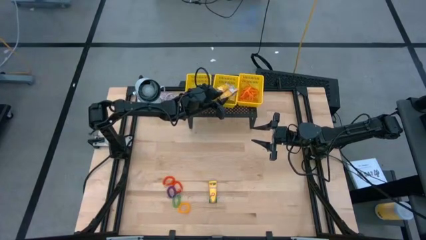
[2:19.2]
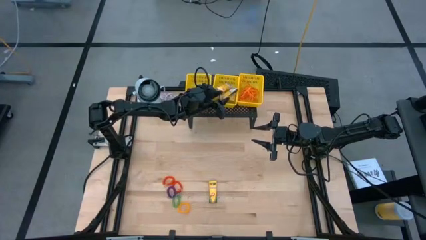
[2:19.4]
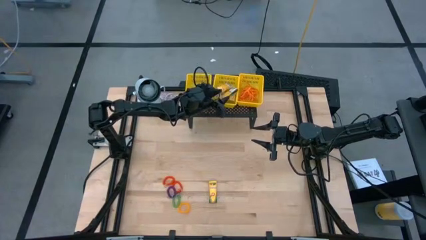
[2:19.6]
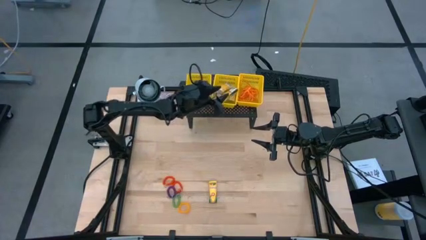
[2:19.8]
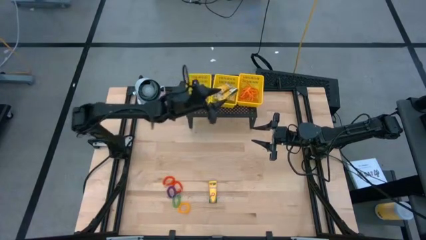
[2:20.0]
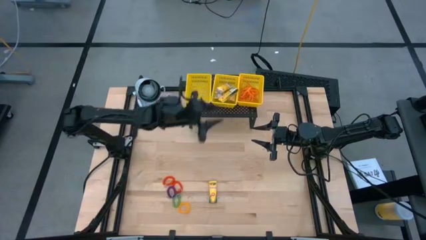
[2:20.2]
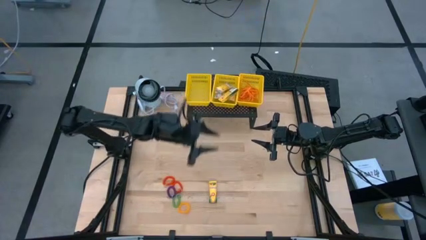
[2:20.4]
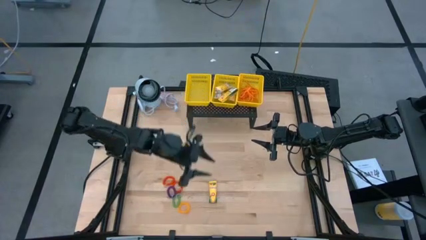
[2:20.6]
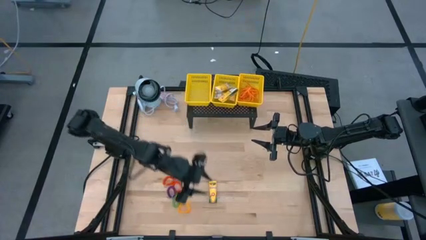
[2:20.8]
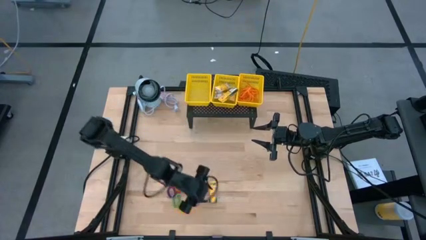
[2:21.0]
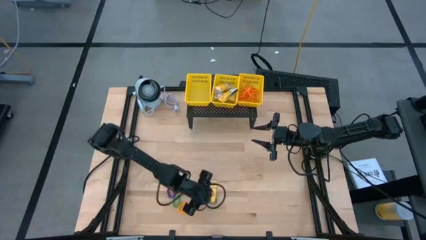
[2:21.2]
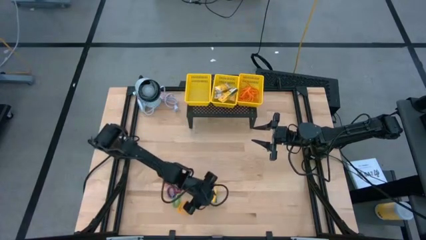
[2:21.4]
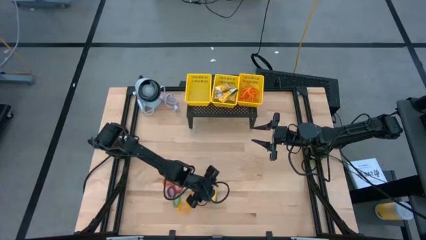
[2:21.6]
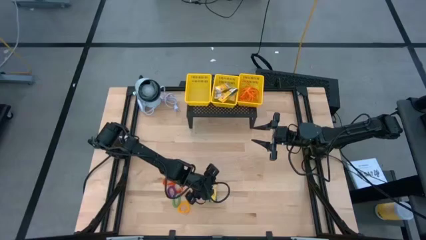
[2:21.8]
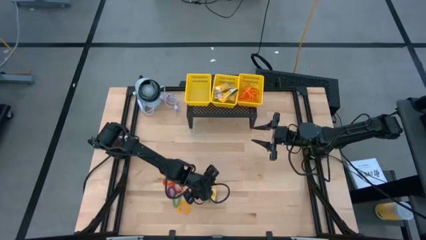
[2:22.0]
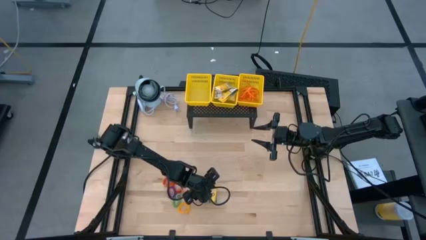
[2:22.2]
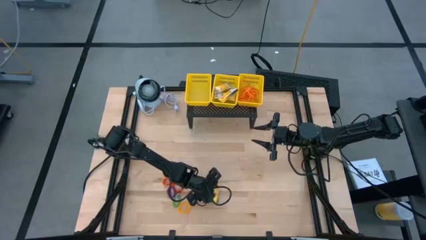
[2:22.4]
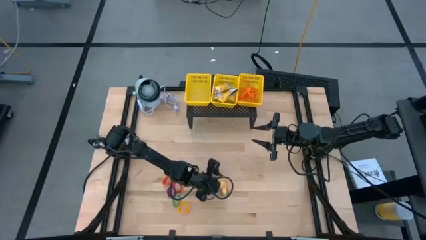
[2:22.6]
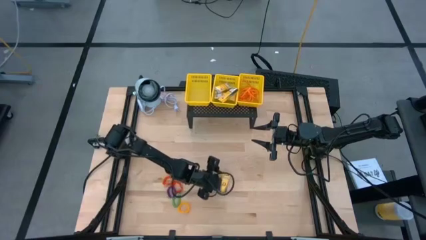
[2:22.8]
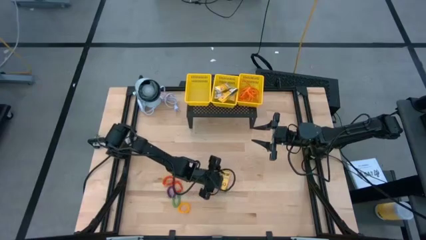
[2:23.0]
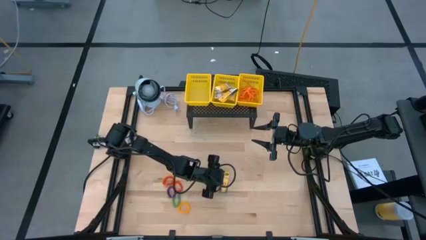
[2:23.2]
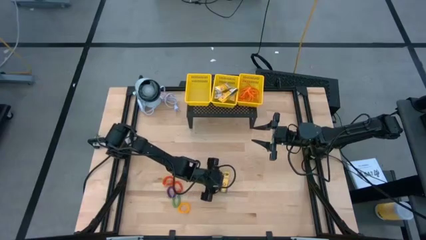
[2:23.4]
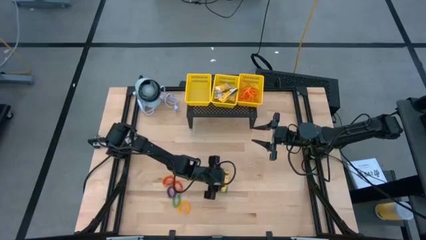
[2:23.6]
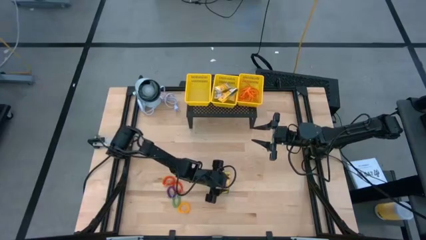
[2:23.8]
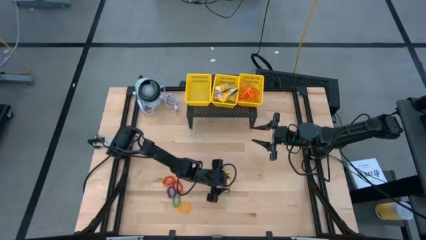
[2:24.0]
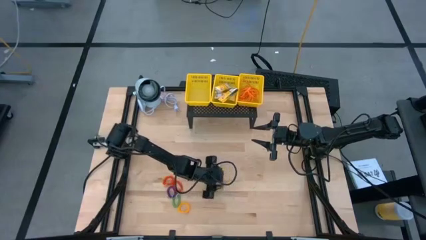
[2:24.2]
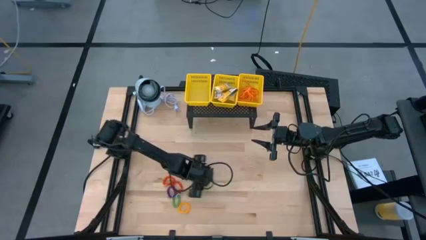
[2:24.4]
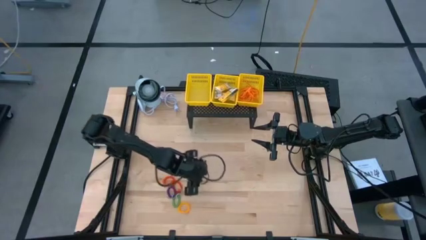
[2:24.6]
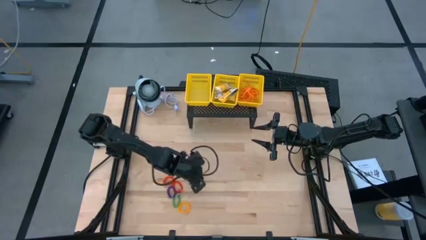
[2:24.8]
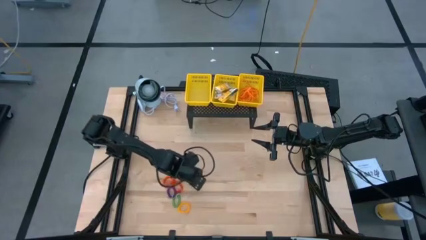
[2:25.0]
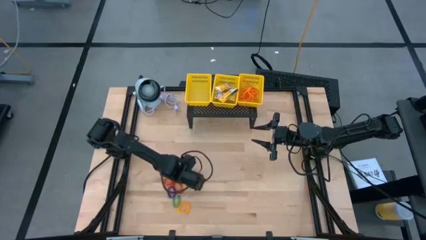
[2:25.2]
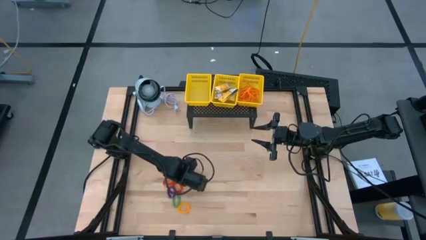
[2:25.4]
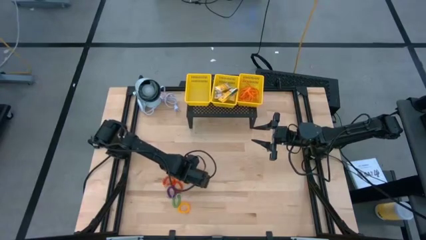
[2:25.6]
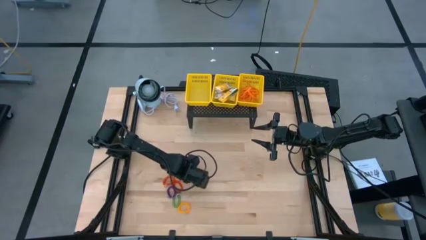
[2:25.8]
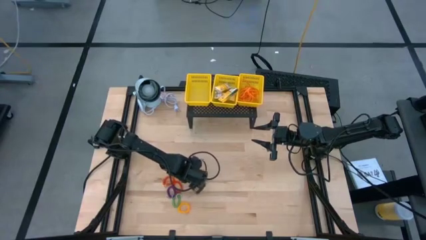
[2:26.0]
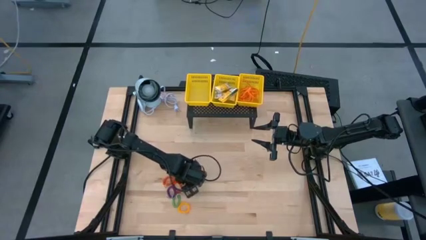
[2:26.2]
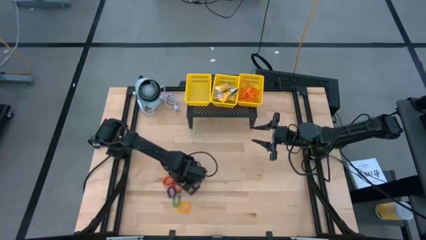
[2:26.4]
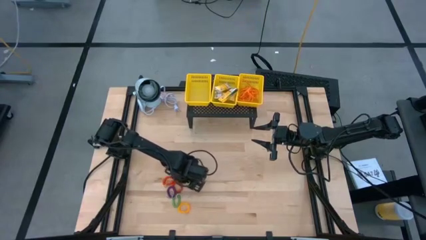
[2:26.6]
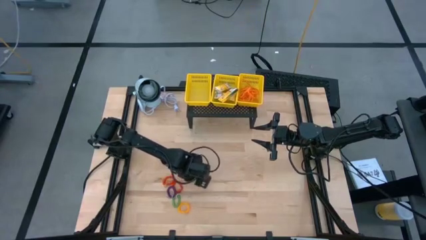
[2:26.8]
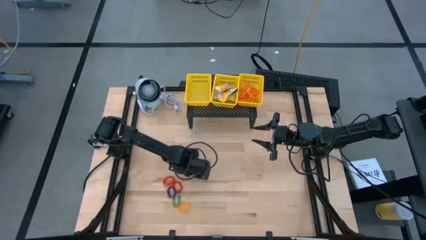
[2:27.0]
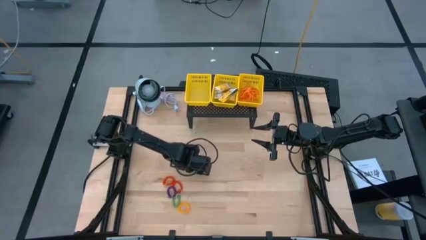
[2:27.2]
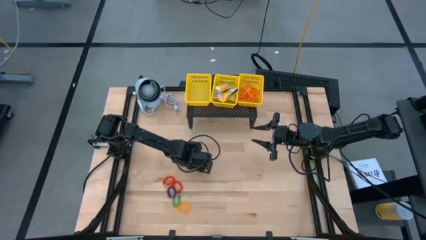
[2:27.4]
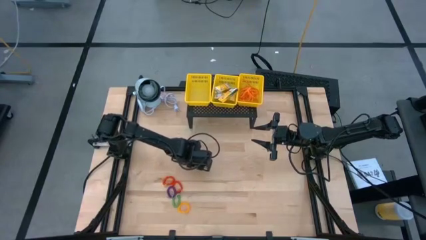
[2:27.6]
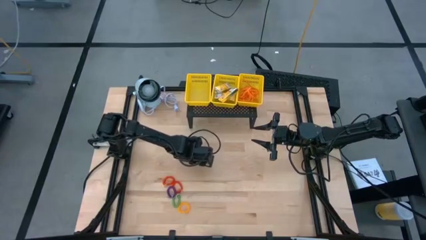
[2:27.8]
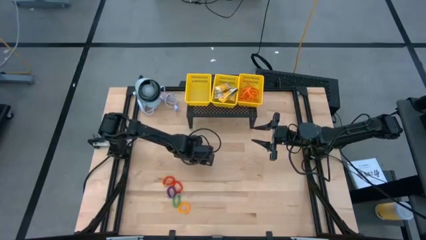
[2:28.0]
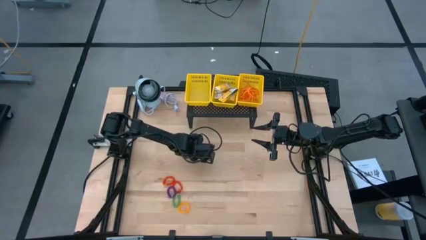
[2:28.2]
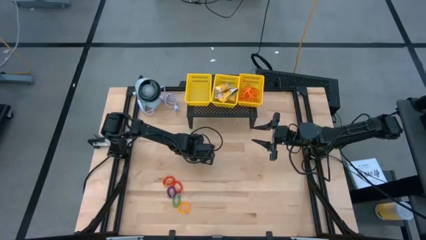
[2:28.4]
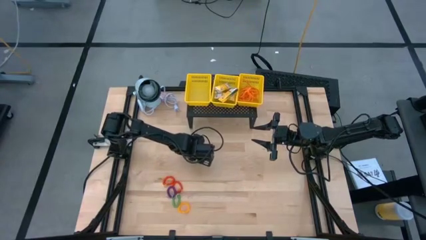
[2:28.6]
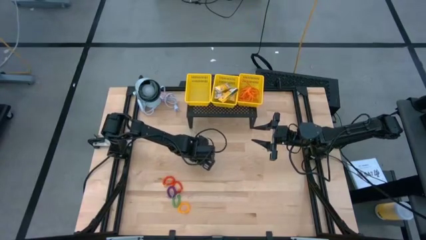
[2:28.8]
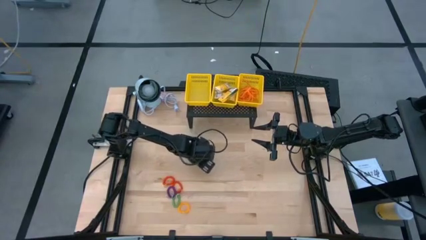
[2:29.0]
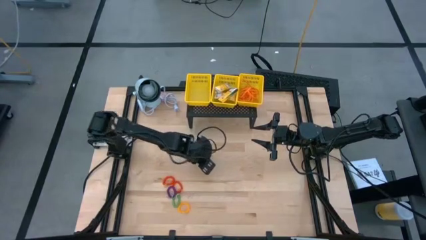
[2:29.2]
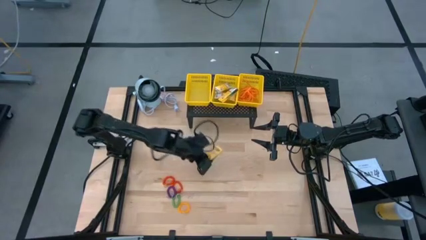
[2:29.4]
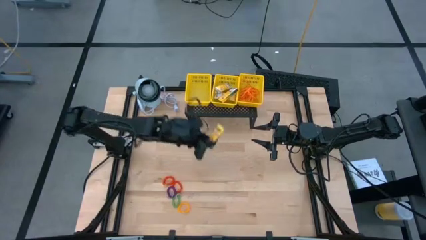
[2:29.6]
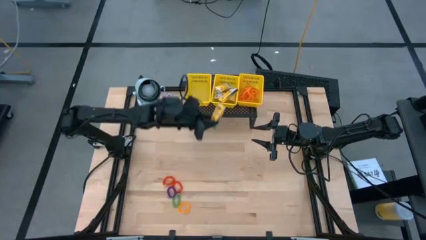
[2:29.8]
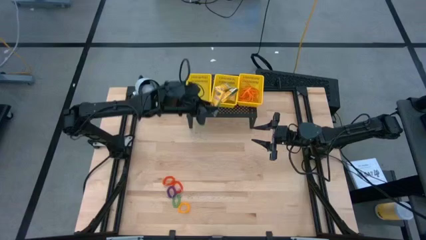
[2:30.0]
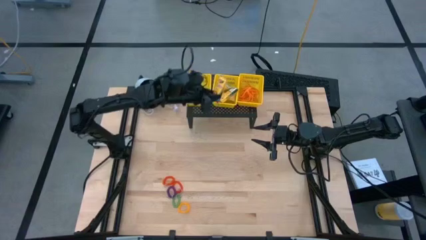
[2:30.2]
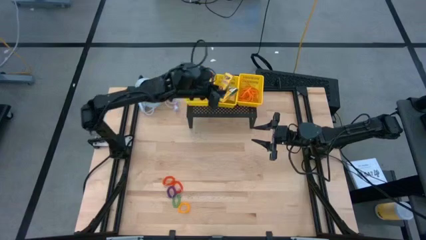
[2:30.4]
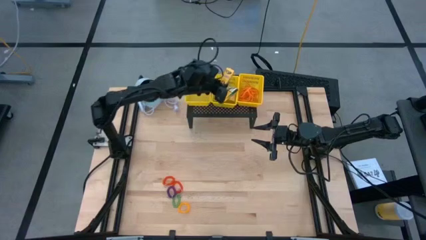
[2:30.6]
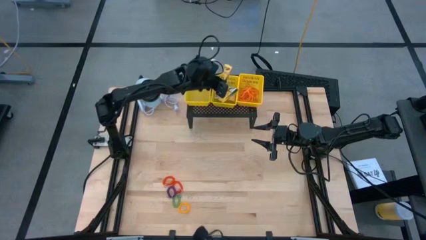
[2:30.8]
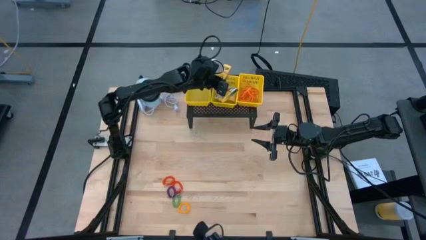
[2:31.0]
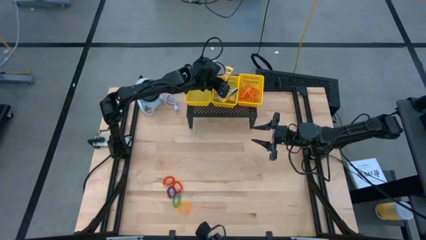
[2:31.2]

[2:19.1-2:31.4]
Task: Pick & Place Office Desk Supplies
Put the crayons box into the middle yellow bin on the shelf

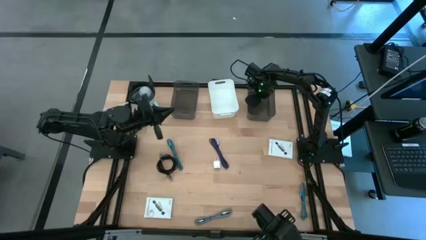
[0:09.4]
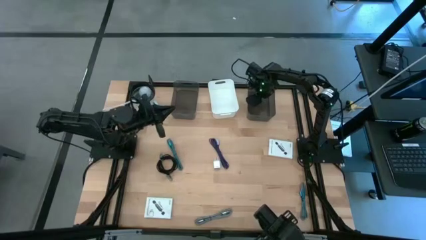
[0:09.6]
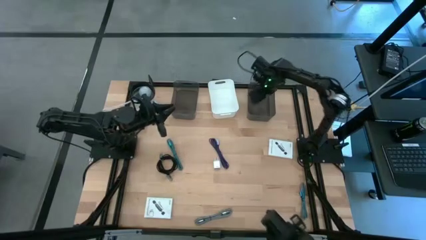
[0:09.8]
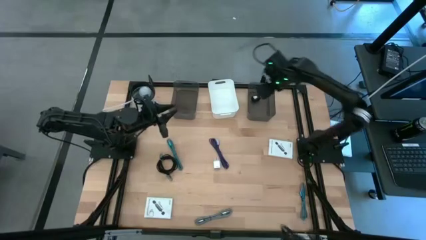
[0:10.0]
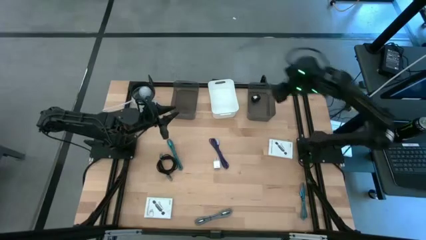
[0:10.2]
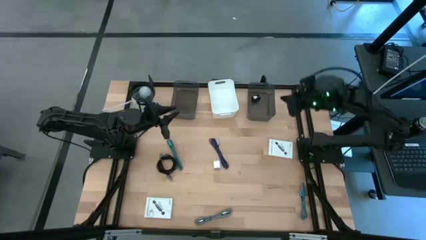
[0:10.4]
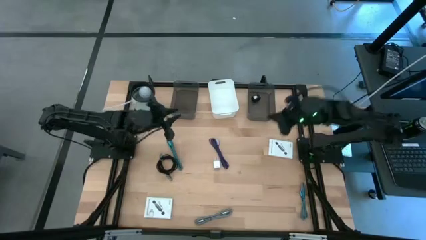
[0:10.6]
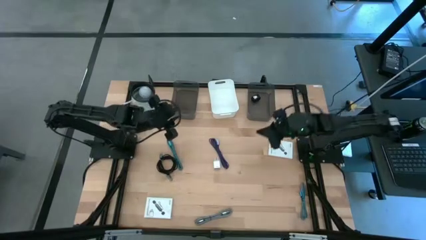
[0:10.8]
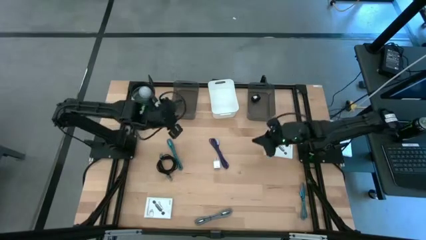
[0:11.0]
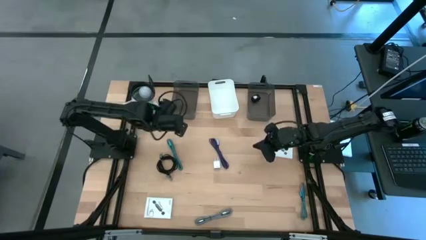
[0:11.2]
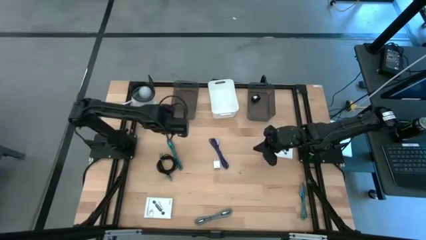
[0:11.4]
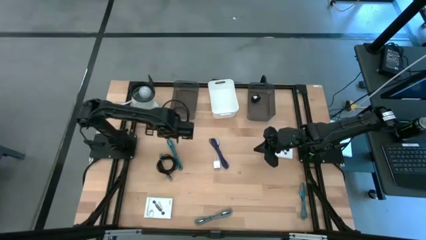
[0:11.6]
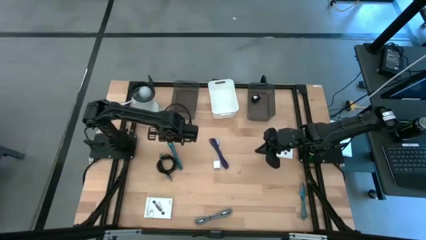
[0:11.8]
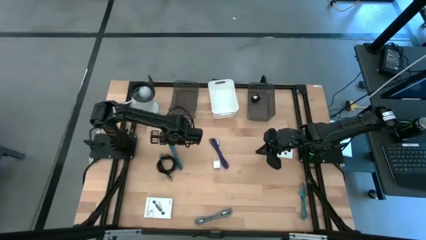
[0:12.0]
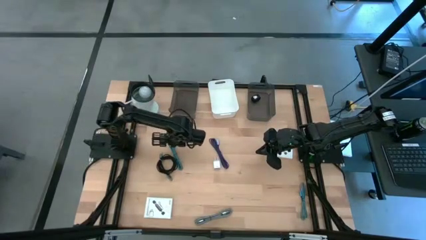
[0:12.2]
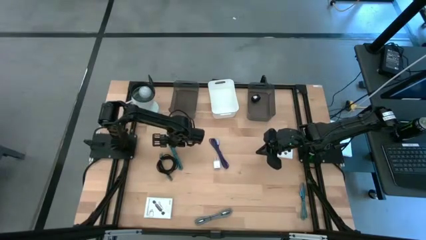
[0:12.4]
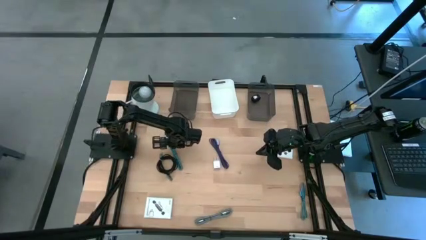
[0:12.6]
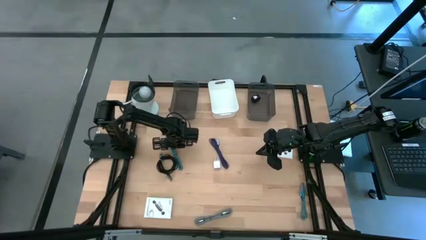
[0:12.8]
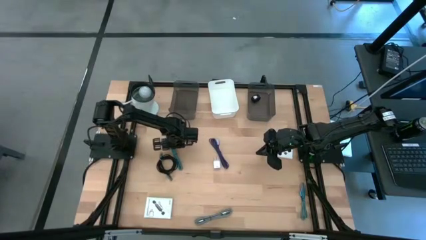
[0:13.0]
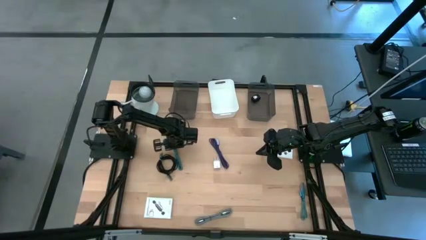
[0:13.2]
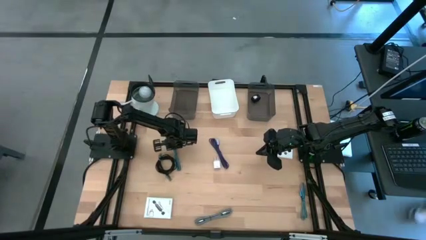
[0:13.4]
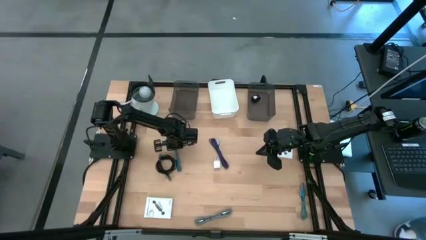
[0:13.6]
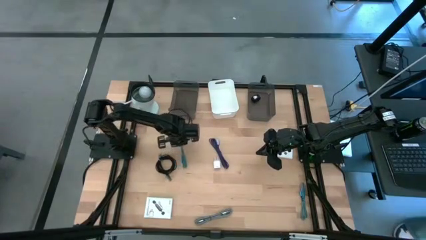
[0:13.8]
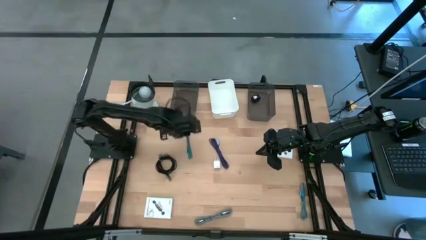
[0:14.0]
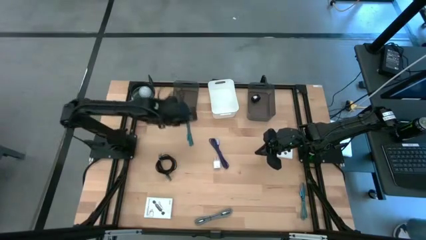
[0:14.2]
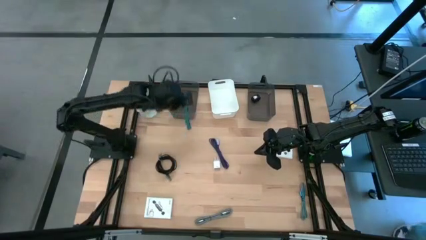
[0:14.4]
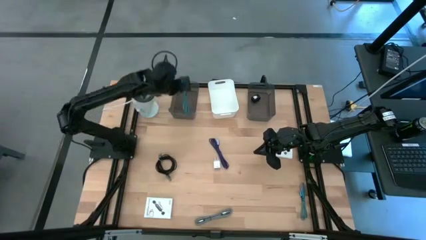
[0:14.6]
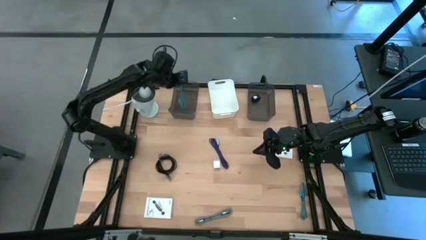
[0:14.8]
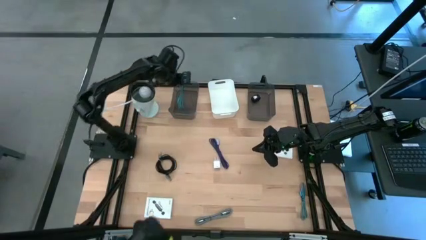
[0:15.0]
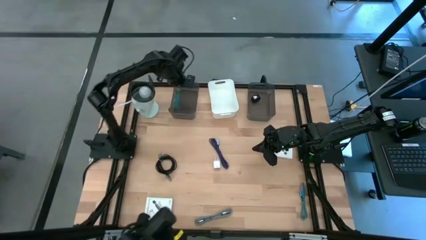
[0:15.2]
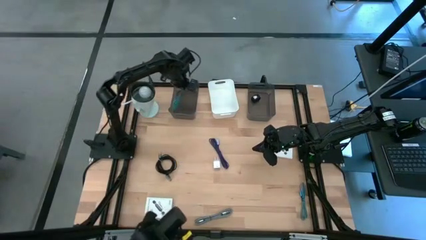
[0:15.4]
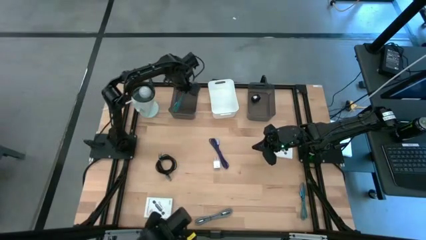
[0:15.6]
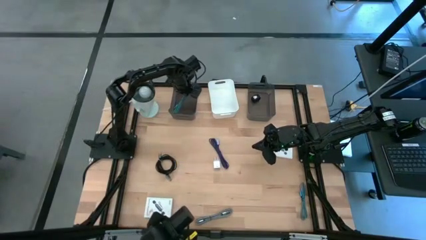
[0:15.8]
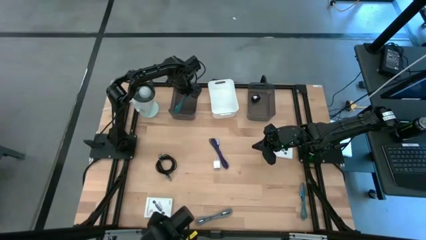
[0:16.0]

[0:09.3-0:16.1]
Task: Pick and place items into bin
Put the left blue charger cable into the left black bin
